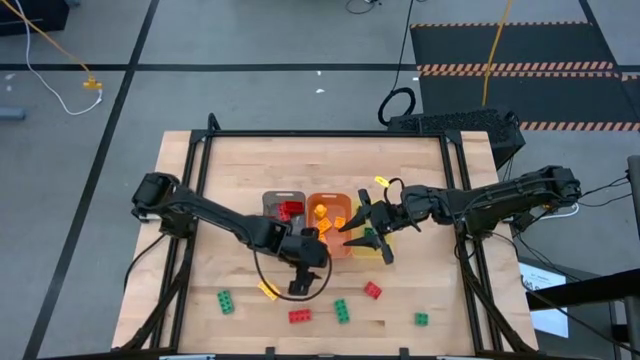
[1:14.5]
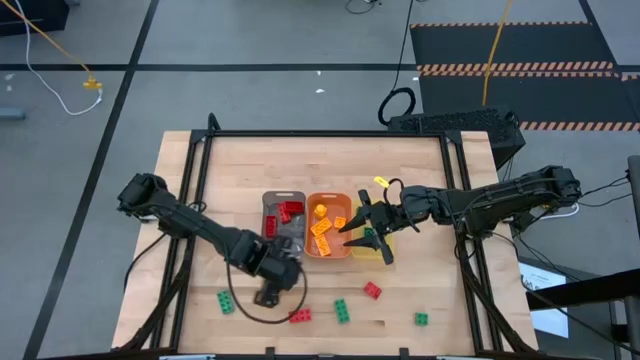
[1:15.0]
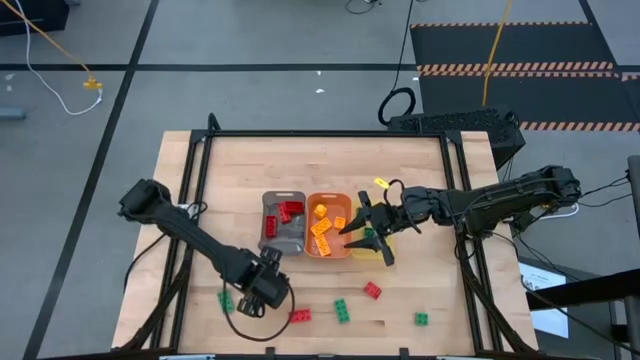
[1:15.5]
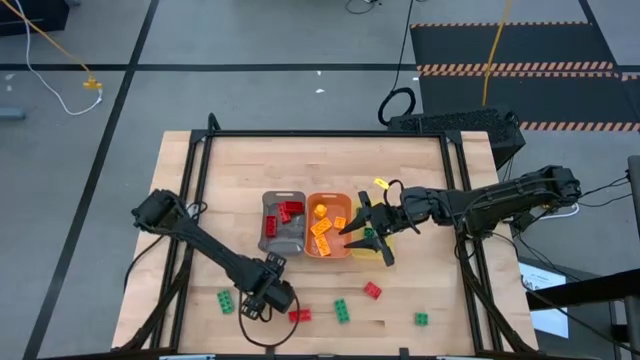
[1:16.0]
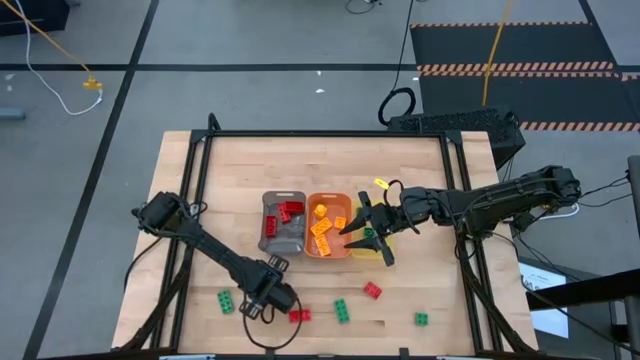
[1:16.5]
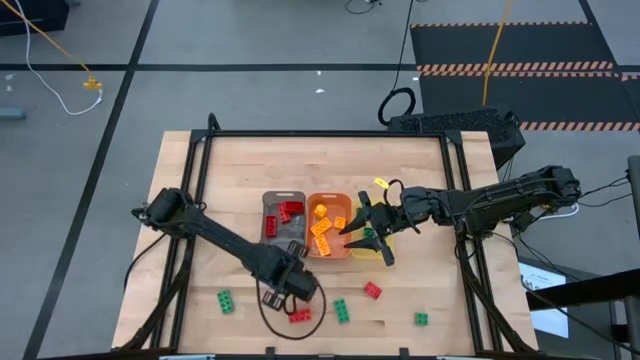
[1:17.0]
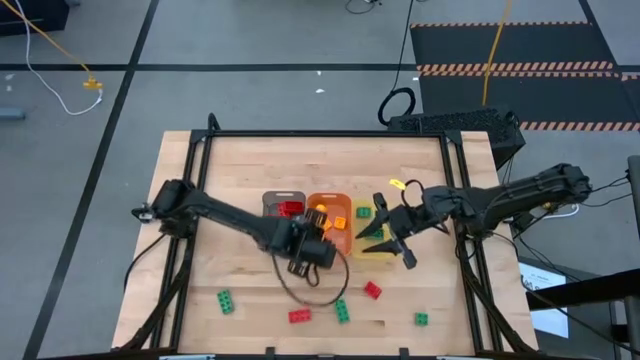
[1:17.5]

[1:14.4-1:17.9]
Task: Sort & place blocks by color
Put the yellow game piece into the orange bin

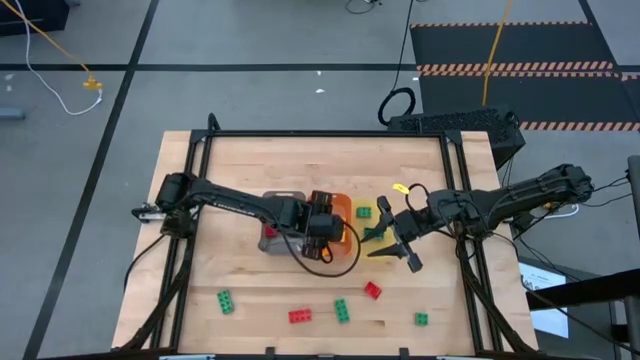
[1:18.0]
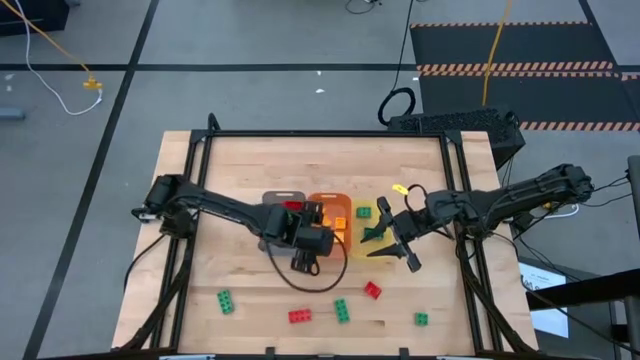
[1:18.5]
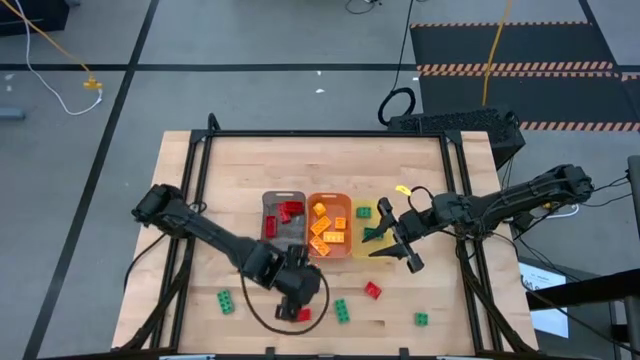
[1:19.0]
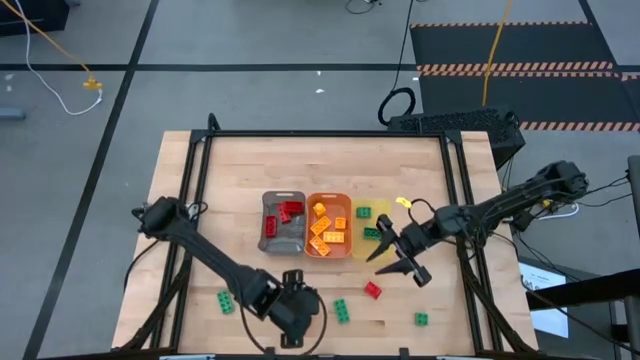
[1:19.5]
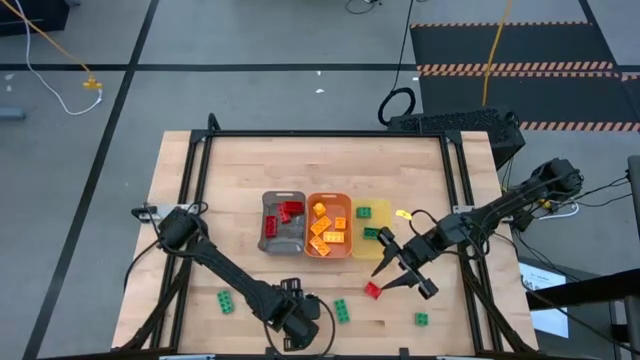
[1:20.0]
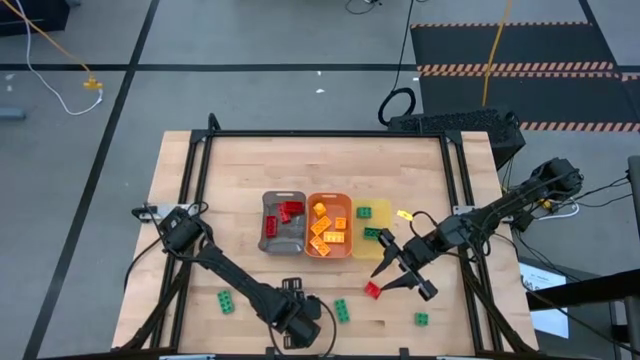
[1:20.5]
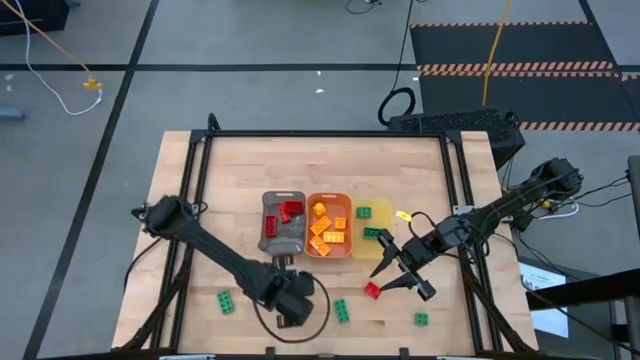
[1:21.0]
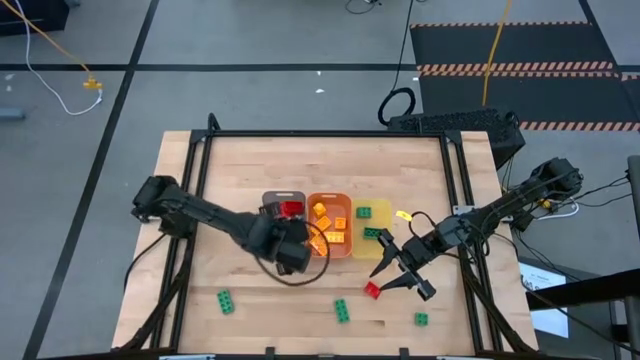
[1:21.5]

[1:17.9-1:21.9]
Put the red game piece into the black bin

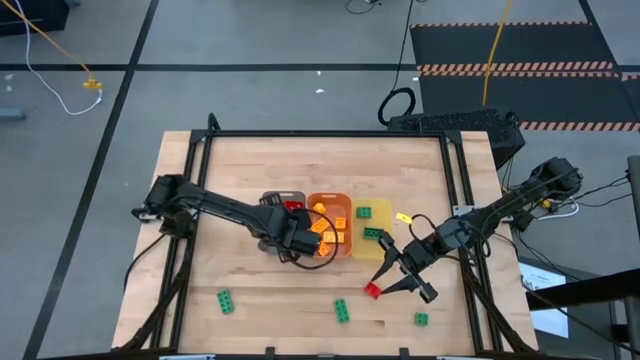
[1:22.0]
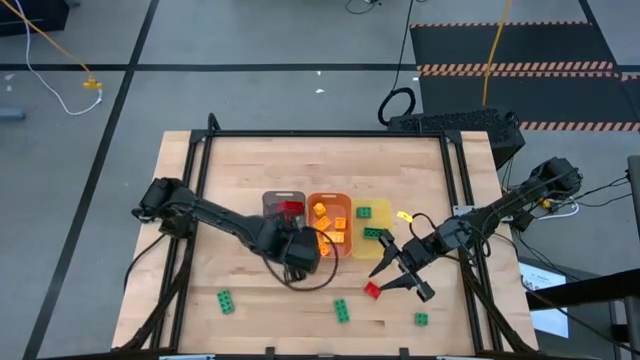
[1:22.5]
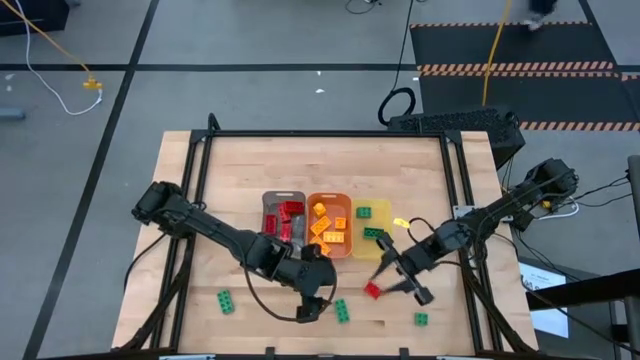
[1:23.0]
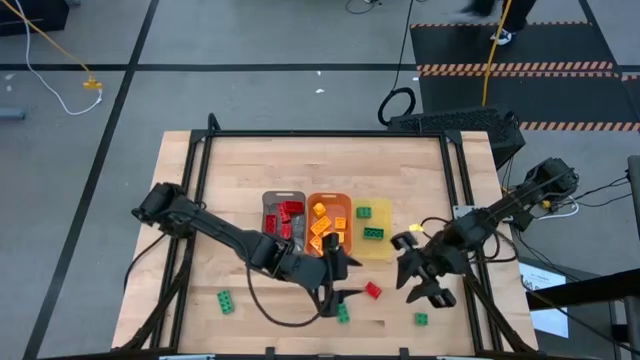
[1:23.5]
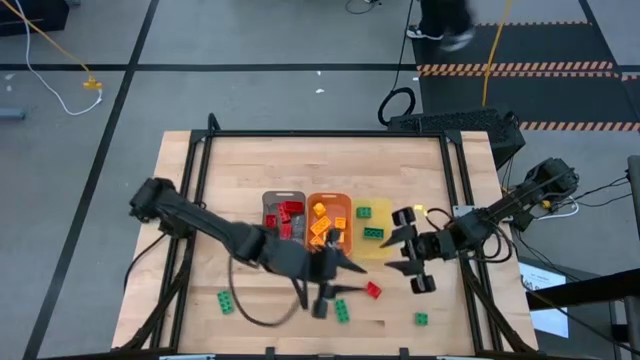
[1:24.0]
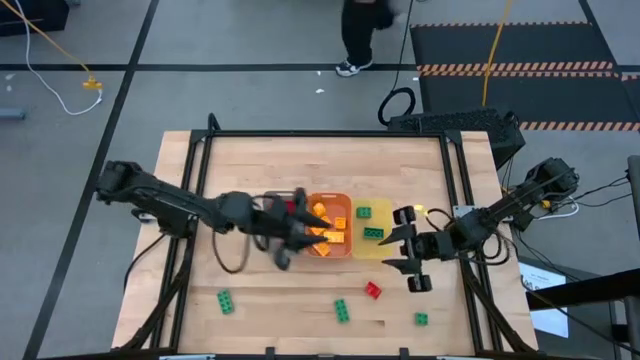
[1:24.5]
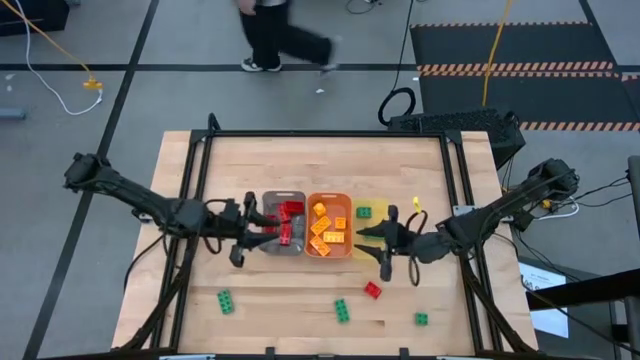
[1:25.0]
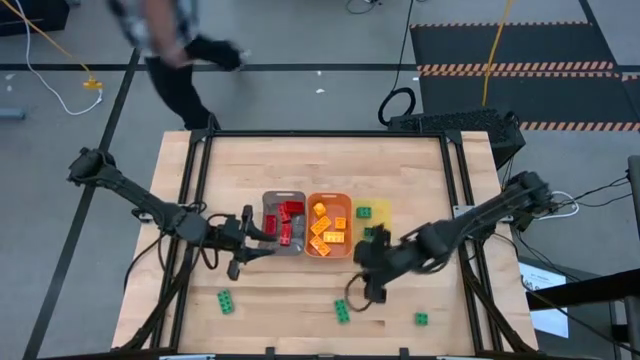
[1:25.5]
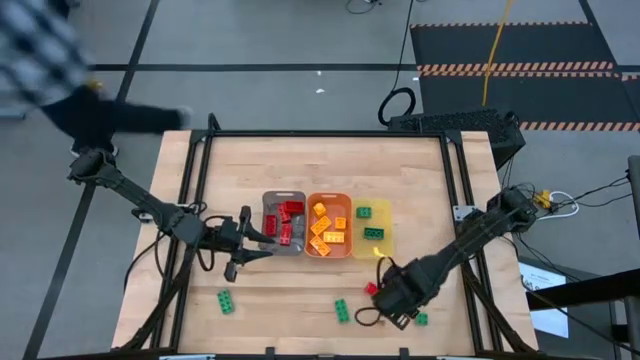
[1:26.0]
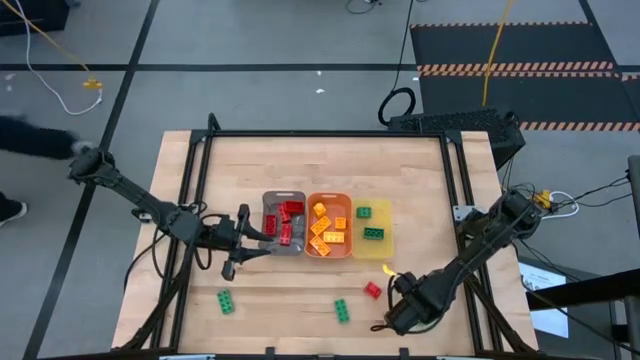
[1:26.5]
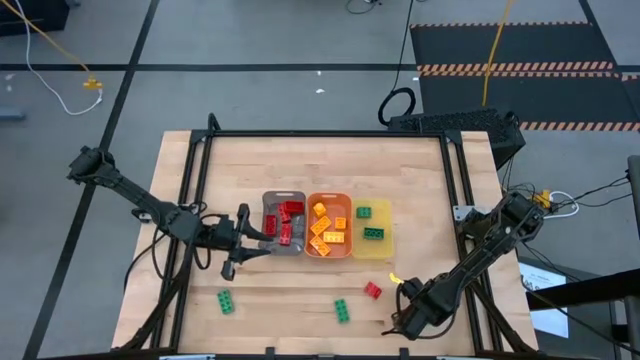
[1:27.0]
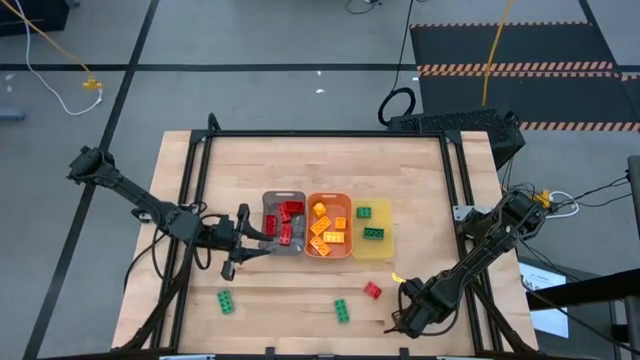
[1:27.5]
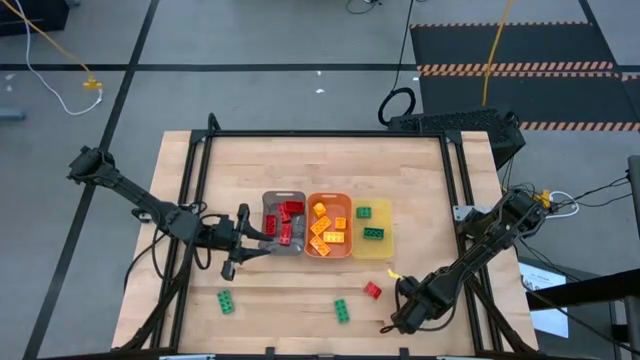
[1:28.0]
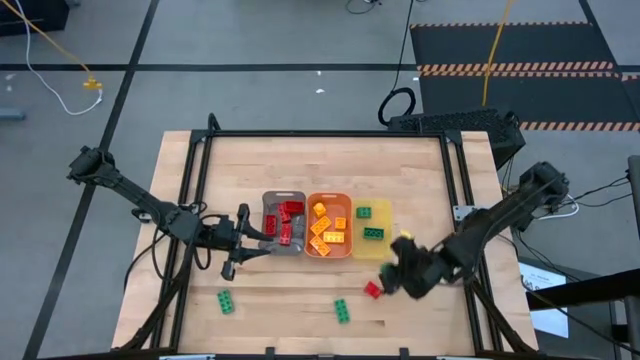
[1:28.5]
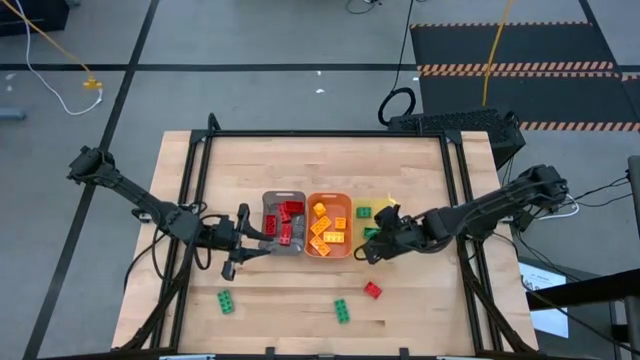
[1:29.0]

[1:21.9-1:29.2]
Put the green game piece into the yellow bin

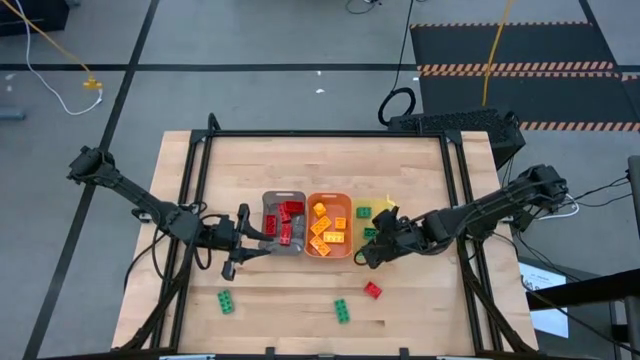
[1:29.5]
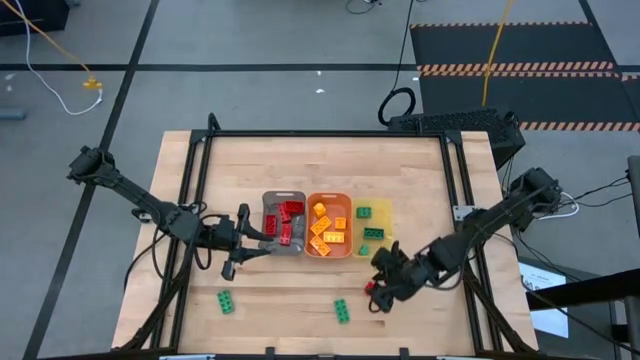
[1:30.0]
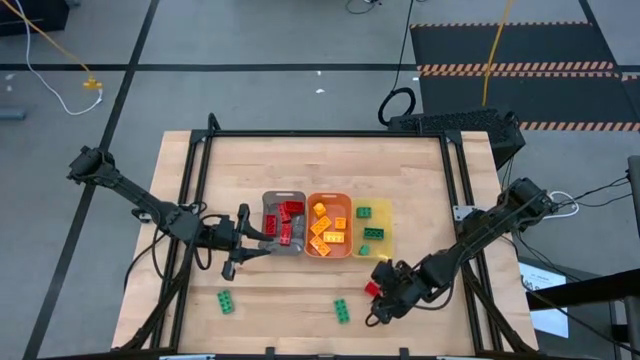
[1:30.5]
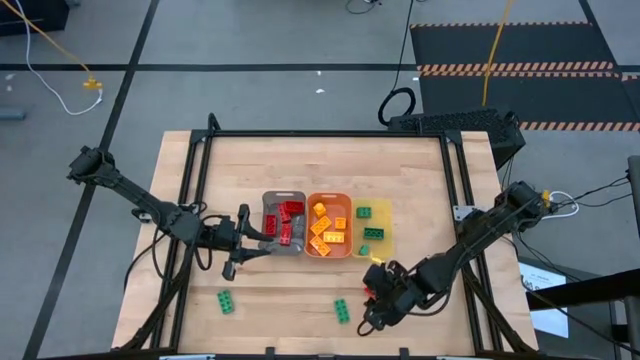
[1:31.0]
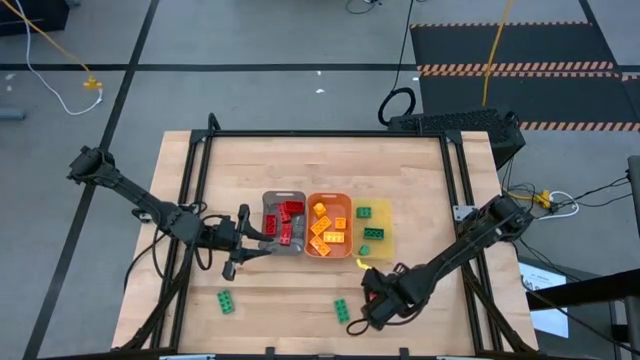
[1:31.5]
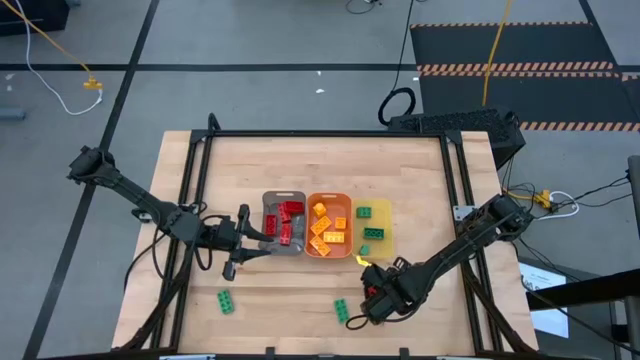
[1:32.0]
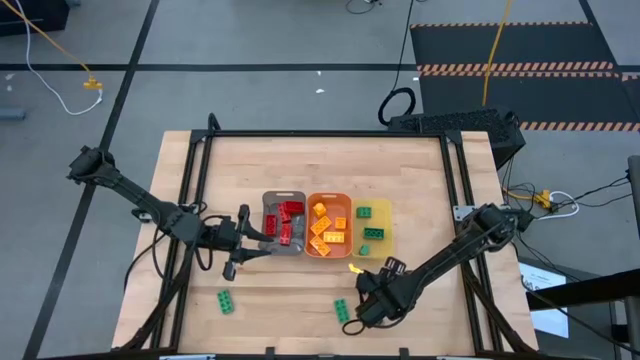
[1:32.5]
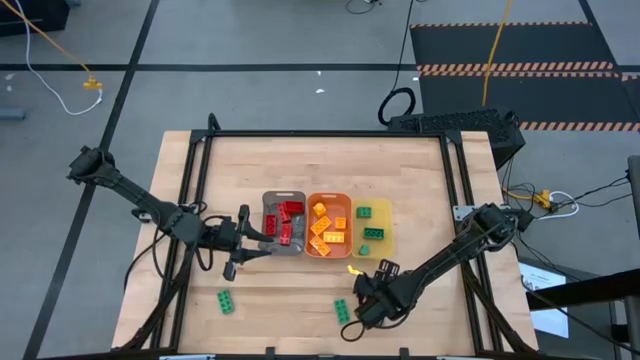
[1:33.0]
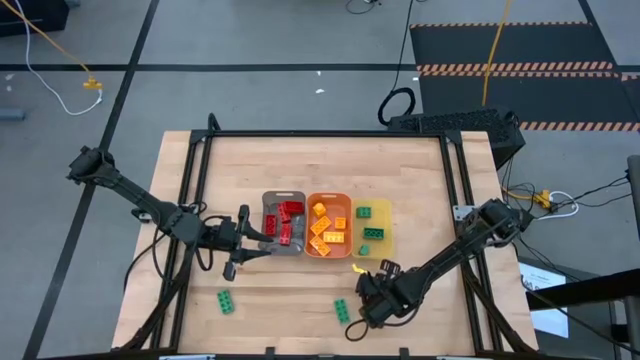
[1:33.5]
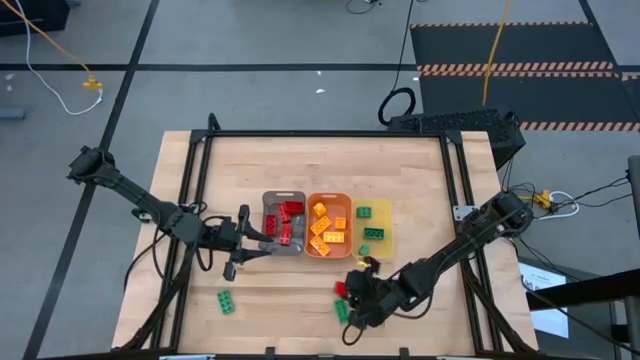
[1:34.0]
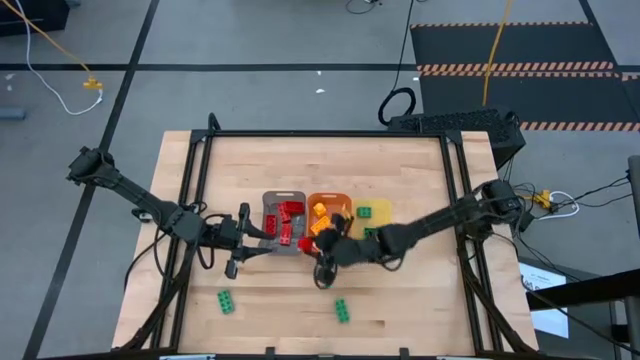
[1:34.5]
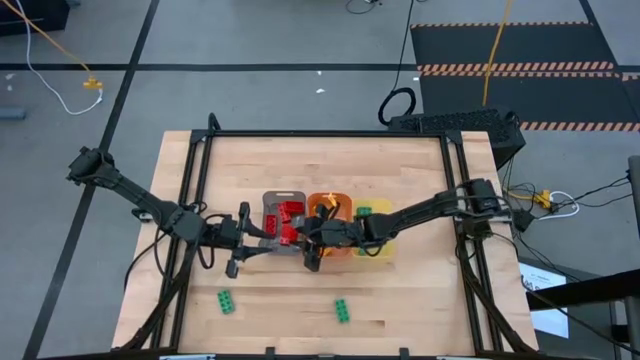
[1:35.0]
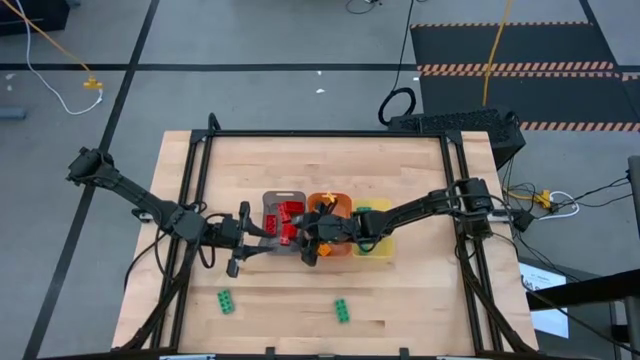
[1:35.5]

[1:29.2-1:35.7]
Put the red game piece into the black bin
